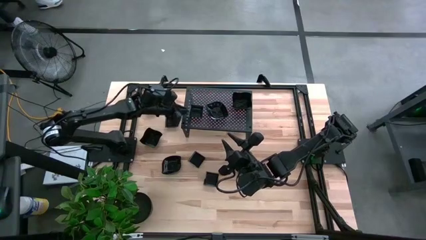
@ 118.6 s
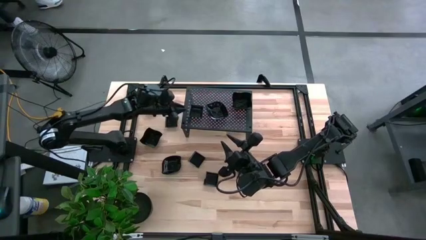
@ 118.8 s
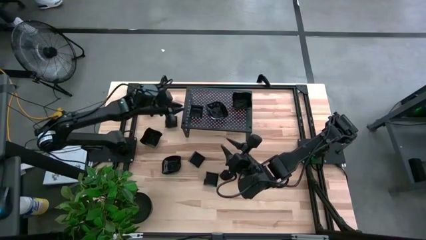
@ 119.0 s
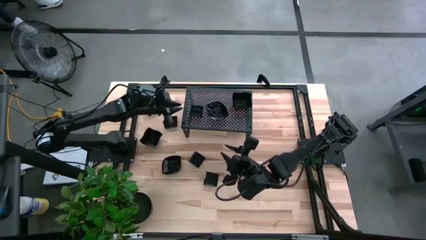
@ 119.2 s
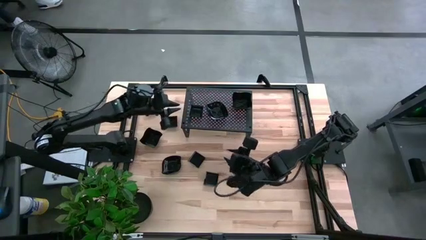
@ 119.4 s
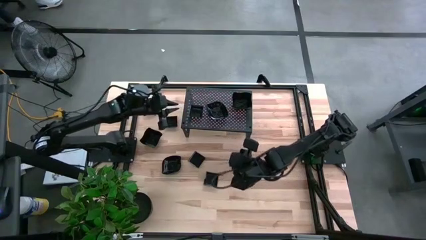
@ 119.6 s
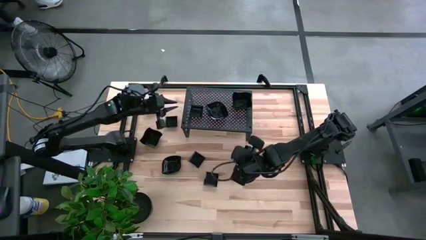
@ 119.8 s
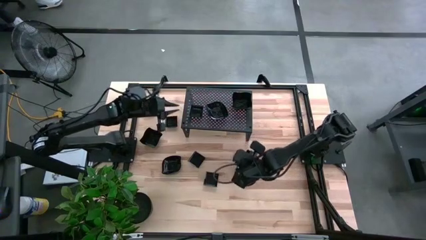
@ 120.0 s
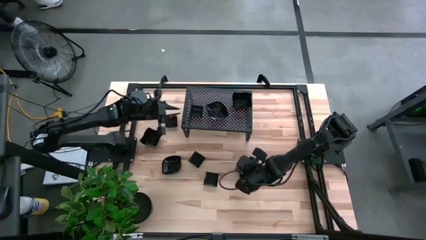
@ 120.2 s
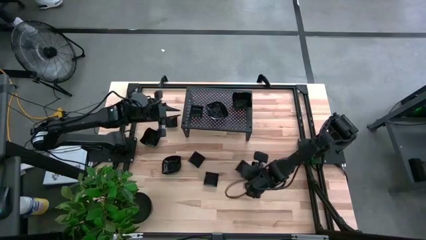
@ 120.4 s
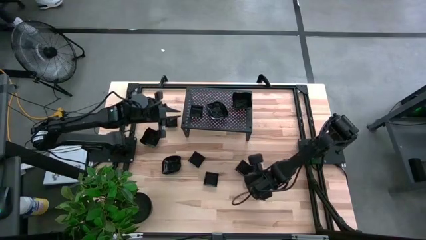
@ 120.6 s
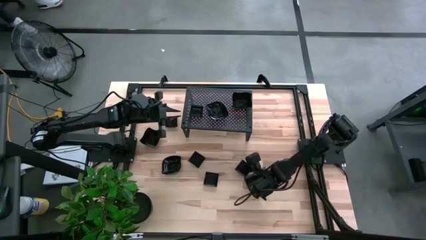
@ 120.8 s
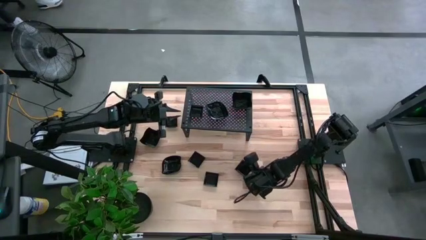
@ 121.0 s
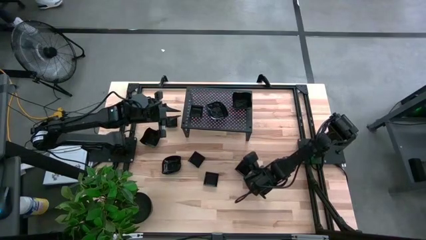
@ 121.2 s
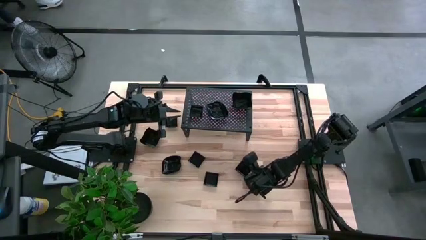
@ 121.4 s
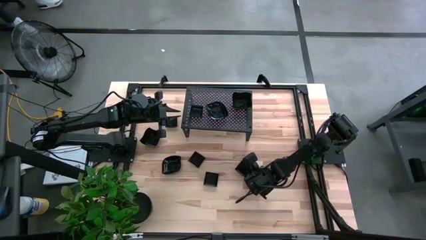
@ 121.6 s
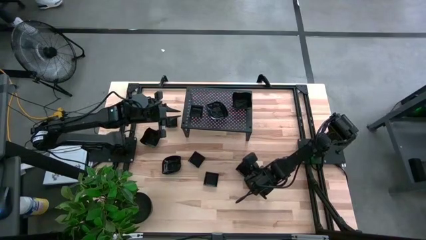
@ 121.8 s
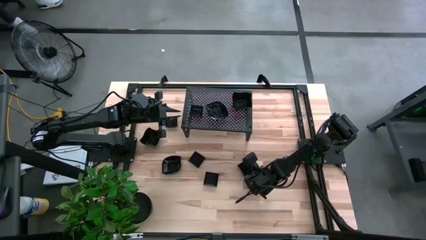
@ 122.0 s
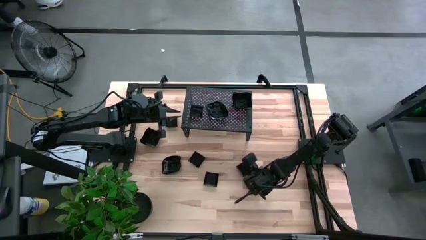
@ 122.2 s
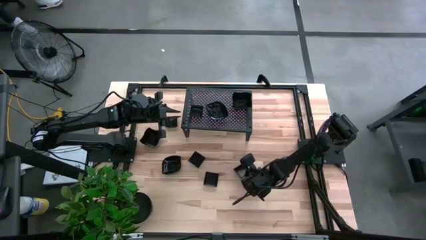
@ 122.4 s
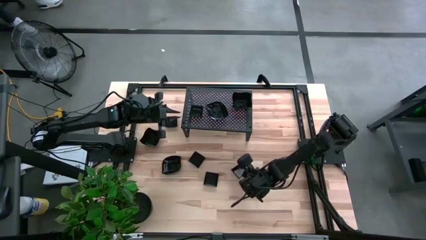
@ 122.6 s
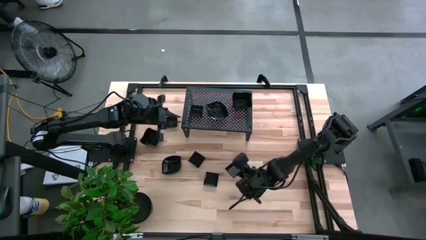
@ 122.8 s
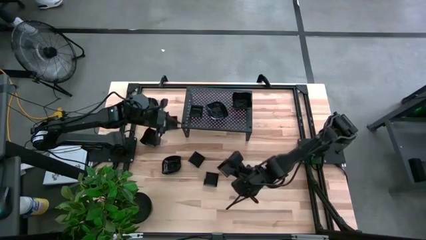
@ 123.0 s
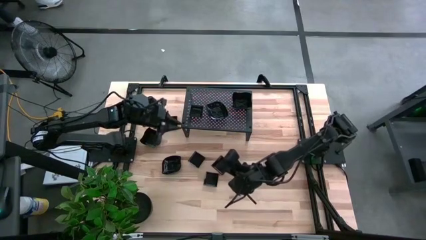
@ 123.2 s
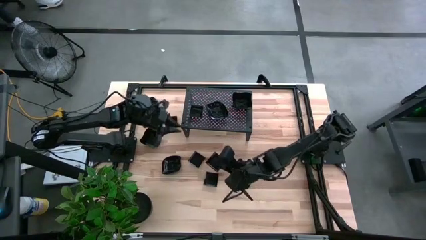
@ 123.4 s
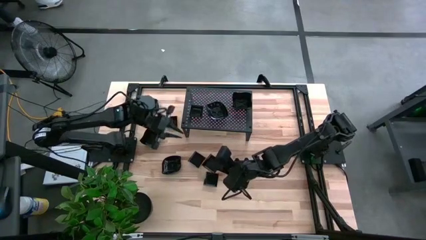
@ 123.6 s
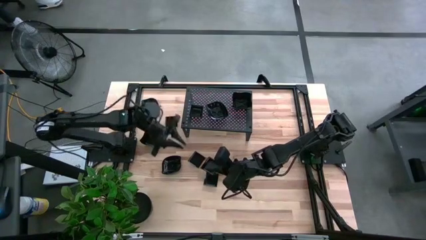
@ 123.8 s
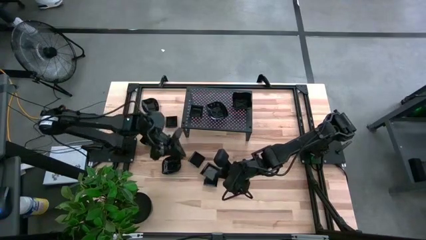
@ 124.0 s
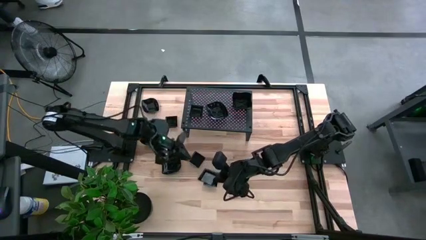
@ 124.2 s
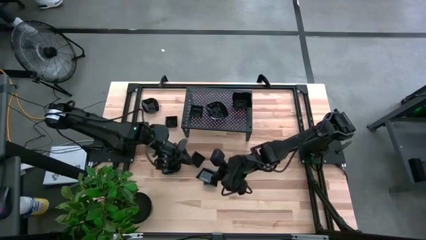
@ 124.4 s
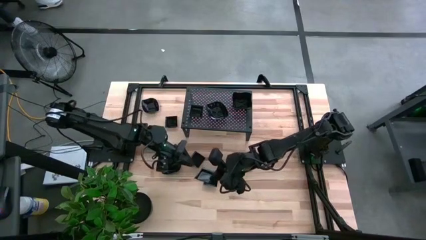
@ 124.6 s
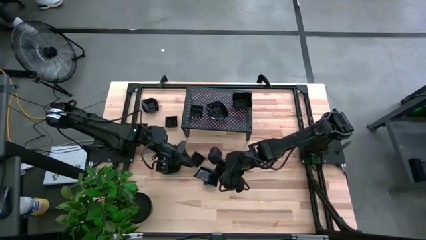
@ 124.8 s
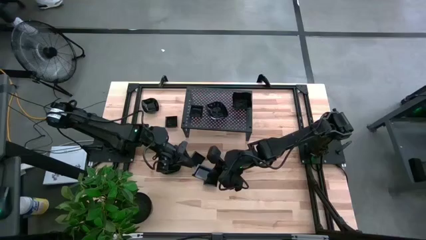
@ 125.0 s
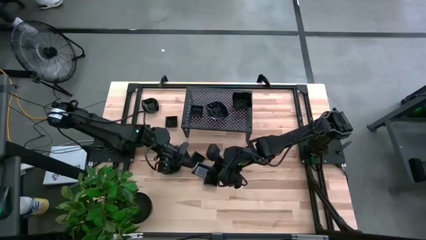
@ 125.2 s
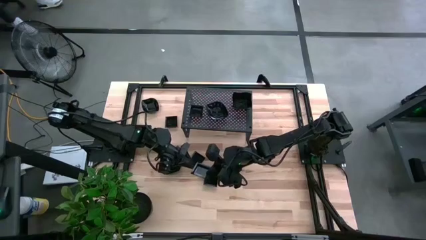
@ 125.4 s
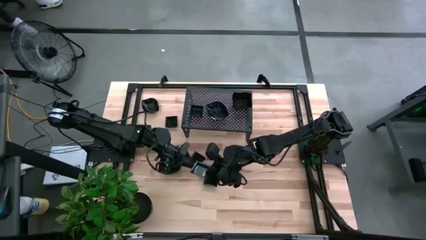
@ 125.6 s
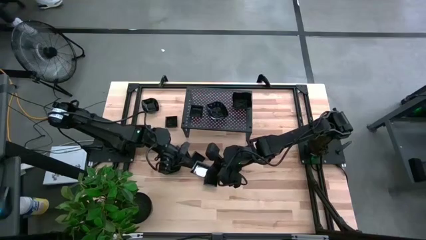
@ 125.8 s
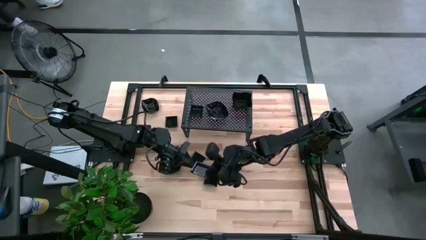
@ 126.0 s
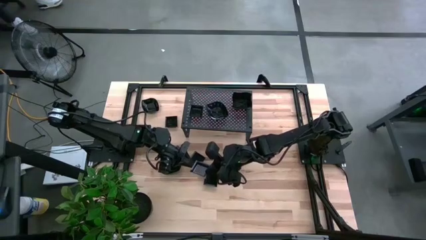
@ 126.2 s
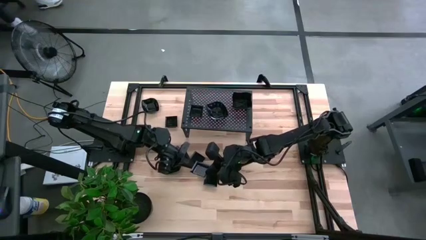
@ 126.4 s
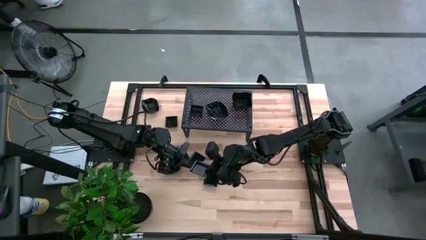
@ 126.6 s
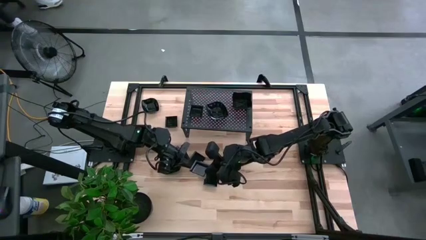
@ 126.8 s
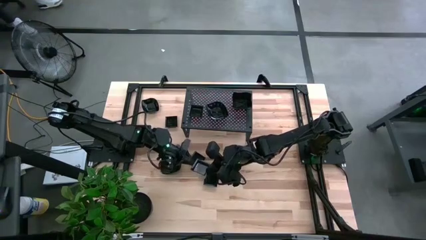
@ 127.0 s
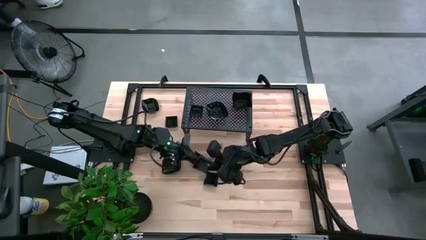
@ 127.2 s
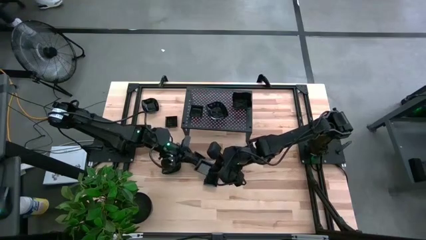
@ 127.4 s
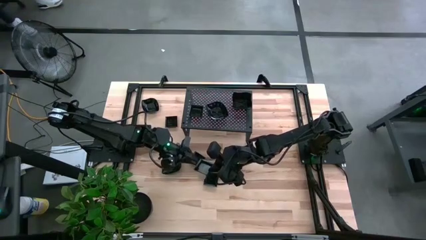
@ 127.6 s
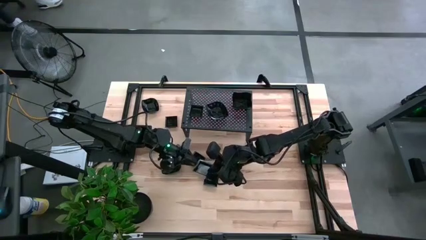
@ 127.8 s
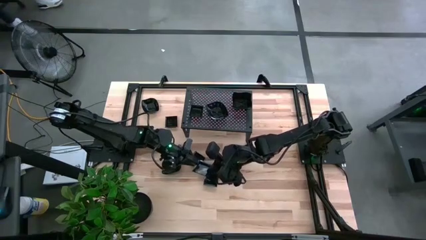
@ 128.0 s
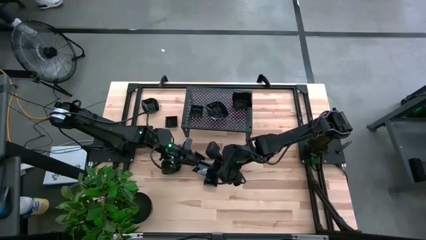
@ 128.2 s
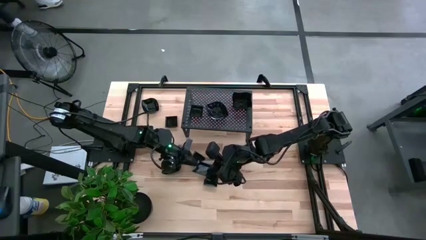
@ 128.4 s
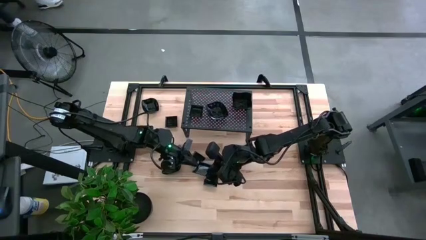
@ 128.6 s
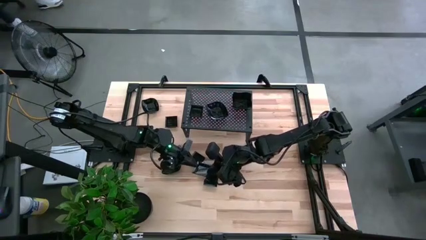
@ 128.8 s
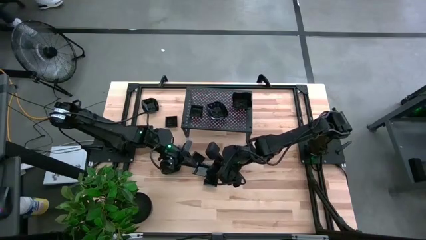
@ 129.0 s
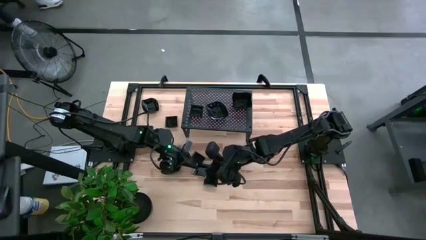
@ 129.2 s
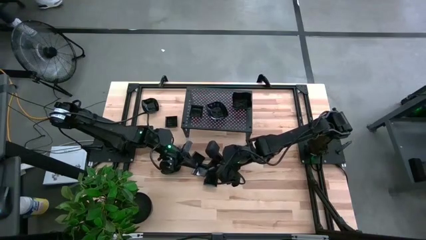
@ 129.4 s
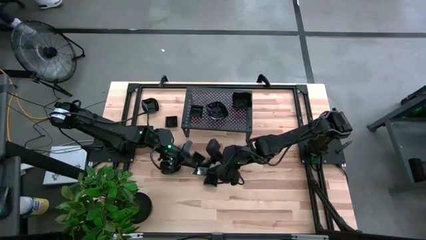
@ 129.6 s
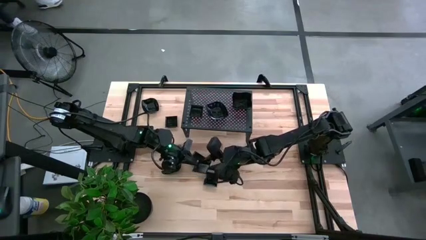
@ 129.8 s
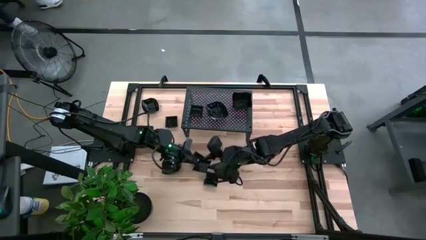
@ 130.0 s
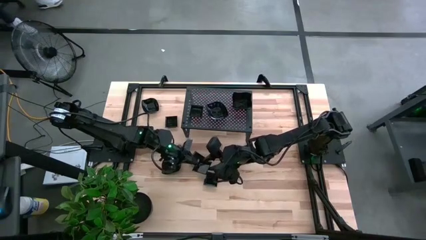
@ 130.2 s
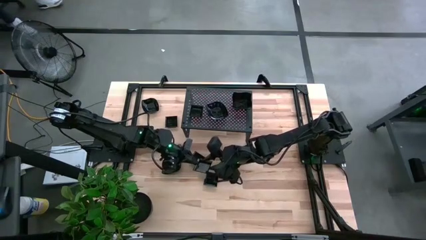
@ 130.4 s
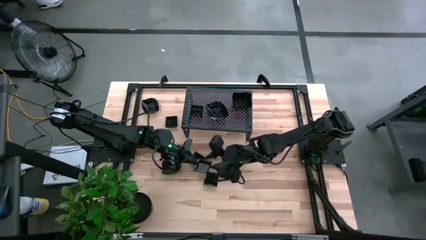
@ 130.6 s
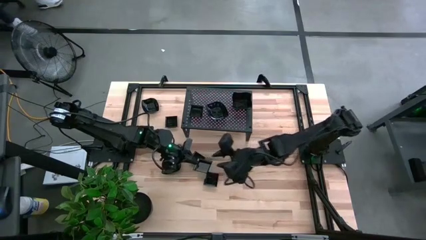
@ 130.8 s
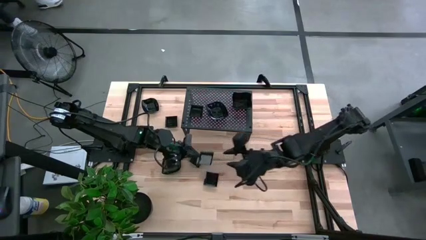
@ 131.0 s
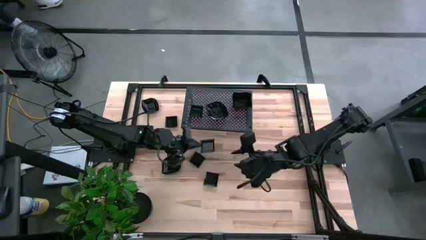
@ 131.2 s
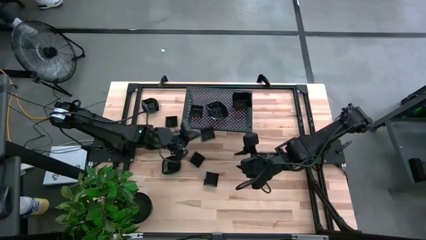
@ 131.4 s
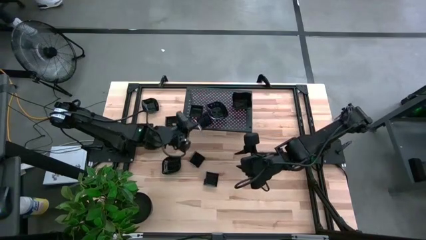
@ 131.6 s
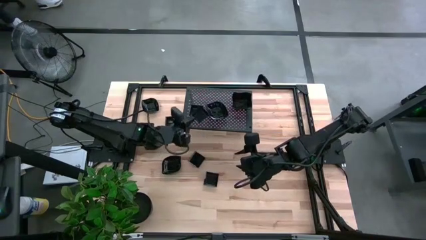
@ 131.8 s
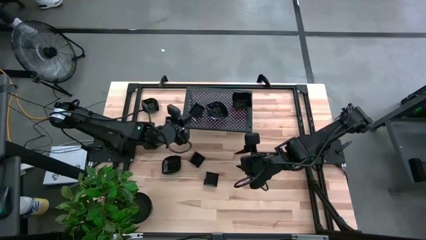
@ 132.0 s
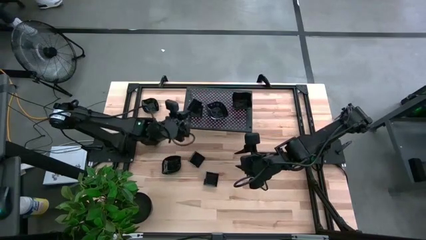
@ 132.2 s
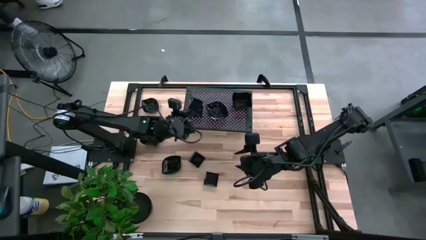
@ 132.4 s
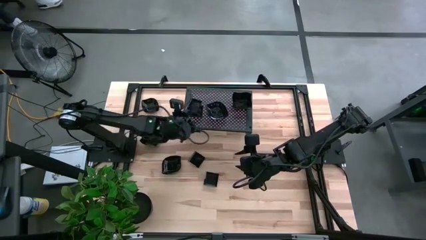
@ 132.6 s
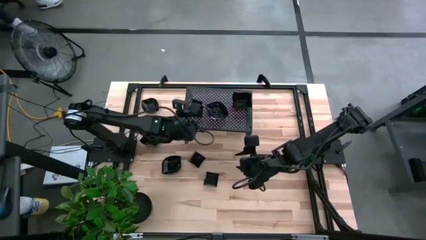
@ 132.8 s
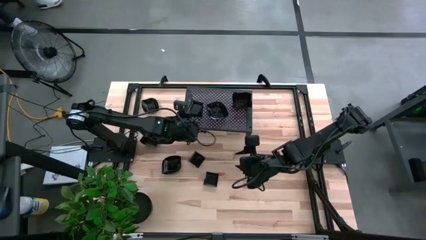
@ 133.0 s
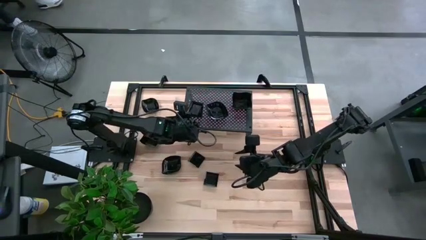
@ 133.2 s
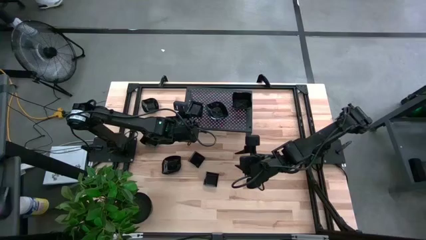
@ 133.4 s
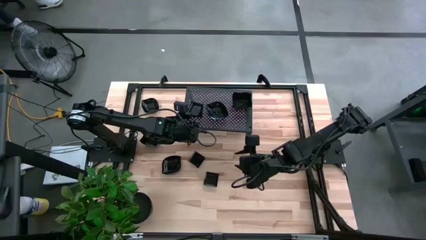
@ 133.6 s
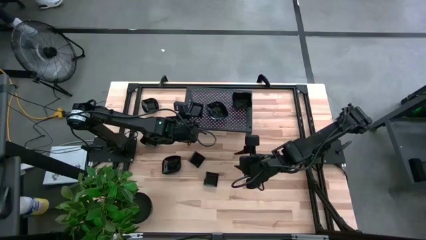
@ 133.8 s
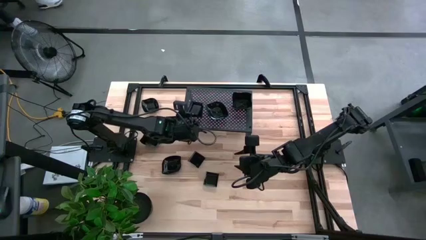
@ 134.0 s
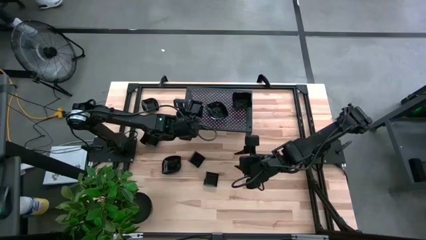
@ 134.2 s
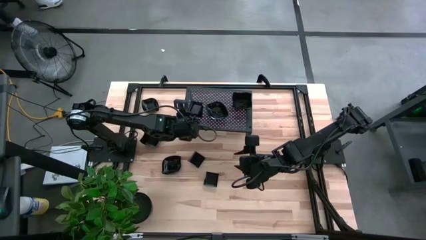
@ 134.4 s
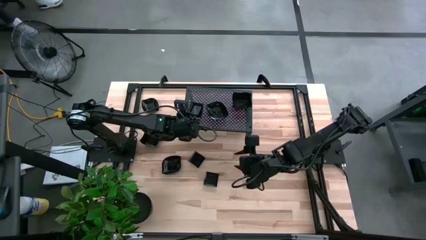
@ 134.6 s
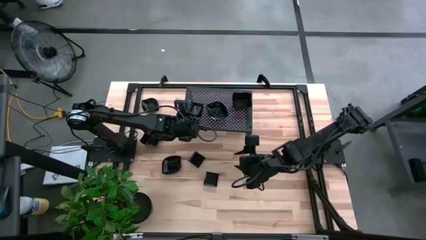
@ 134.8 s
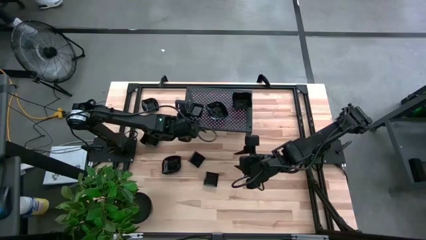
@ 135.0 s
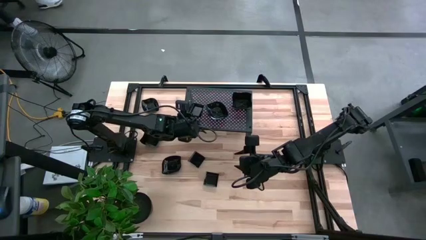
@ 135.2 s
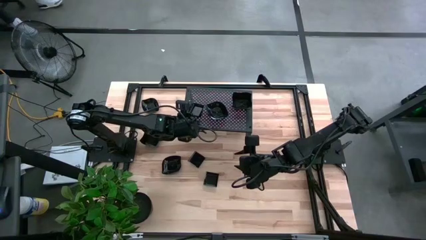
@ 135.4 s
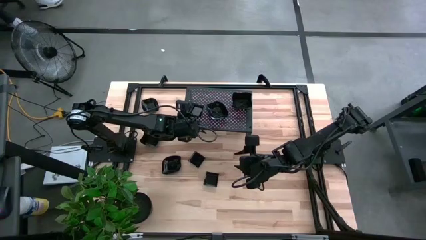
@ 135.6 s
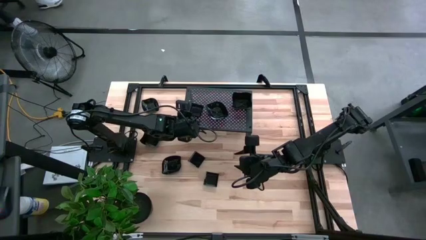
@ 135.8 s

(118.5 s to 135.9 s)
Task: Pick & Place Mini shaped plates
Stack the square plate on the square plate on the shelf
